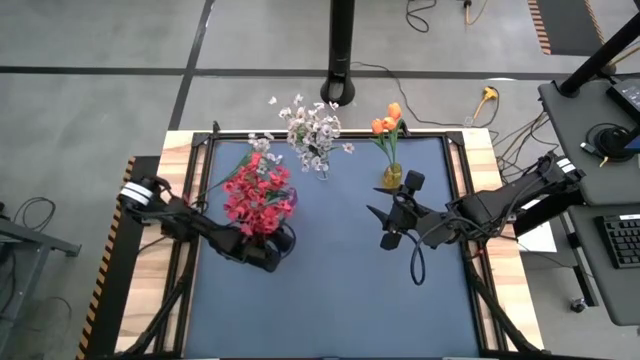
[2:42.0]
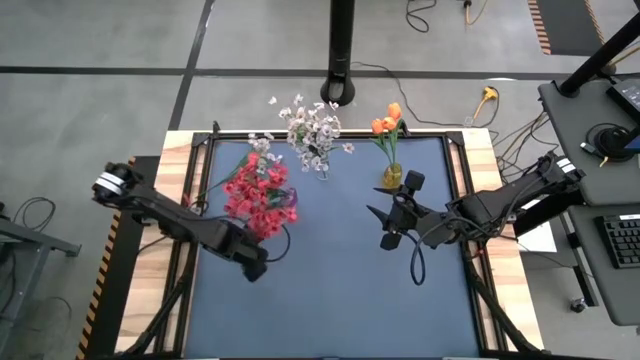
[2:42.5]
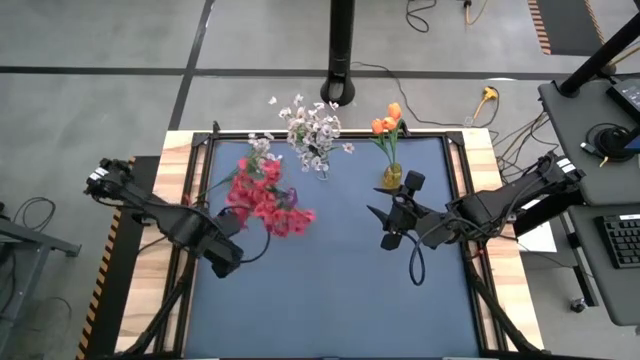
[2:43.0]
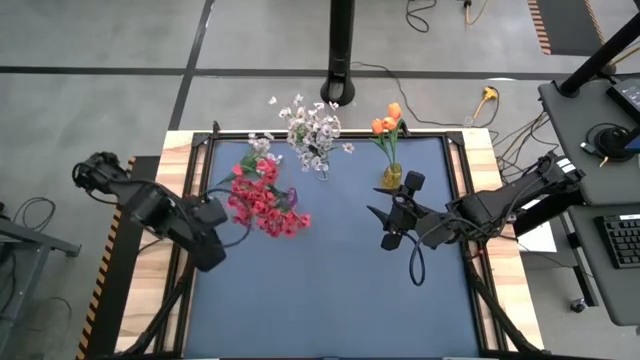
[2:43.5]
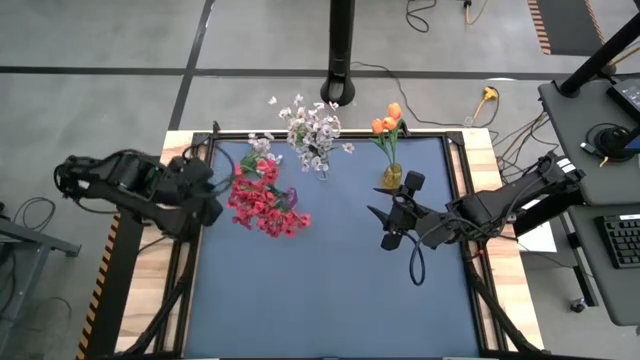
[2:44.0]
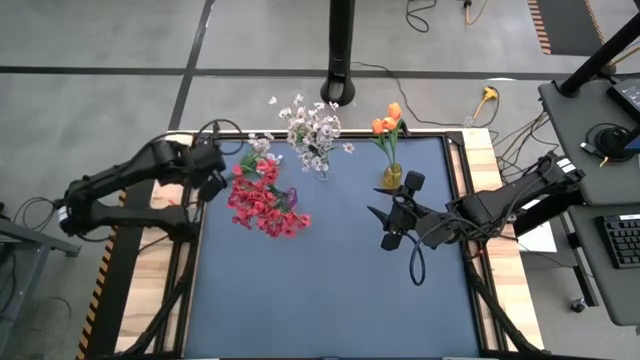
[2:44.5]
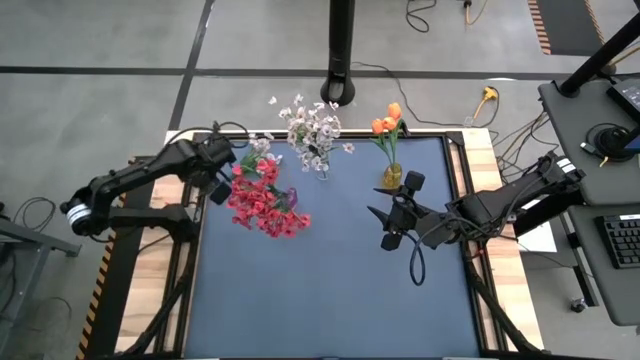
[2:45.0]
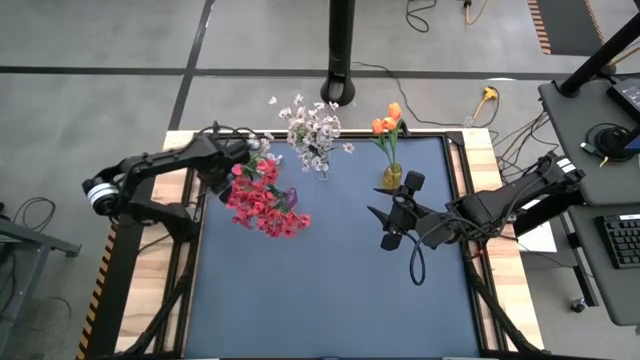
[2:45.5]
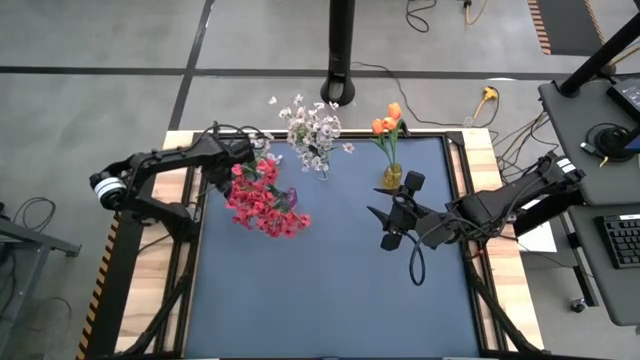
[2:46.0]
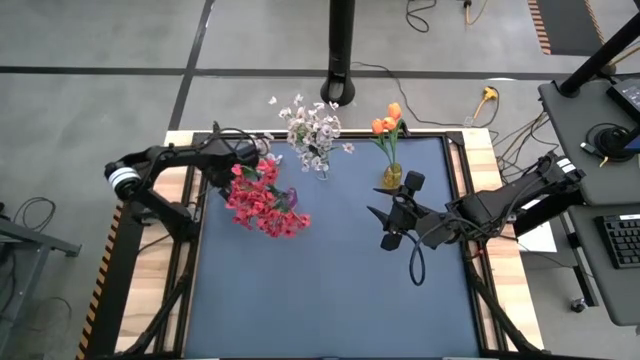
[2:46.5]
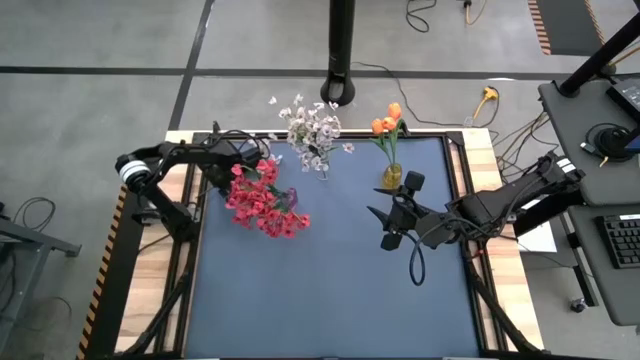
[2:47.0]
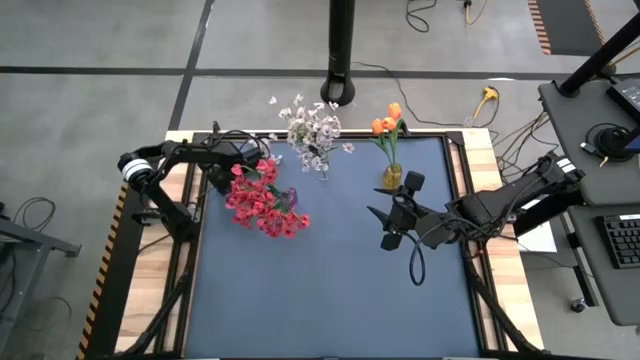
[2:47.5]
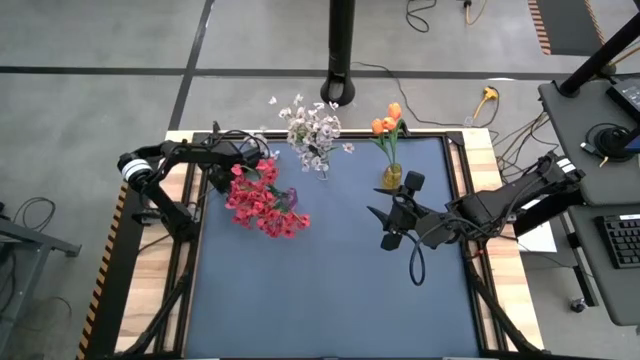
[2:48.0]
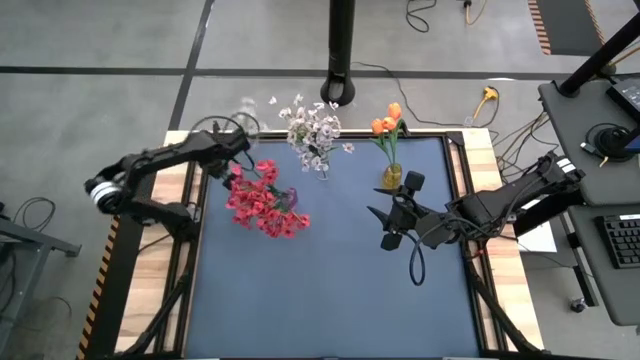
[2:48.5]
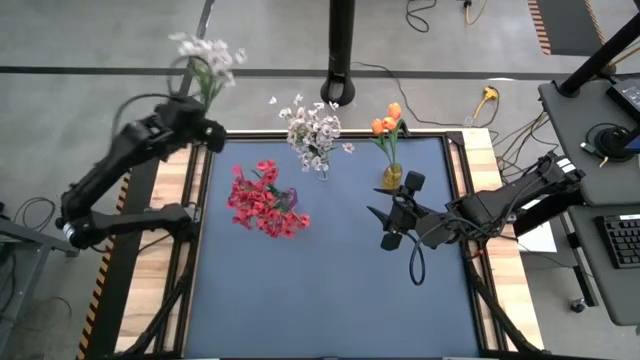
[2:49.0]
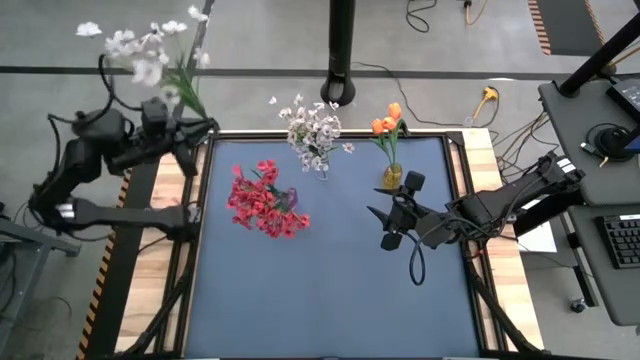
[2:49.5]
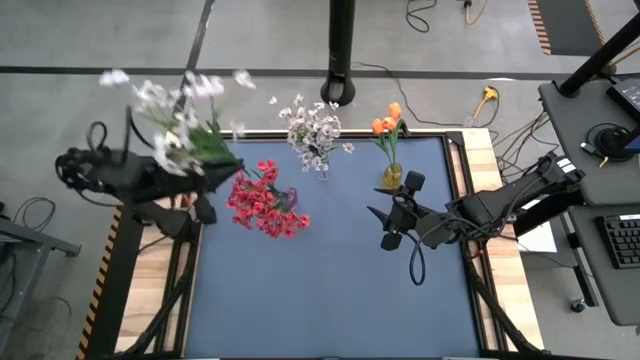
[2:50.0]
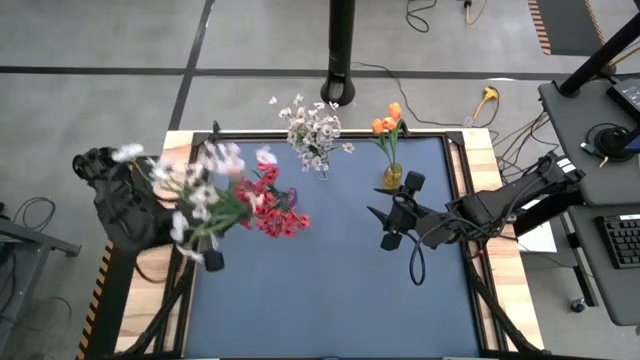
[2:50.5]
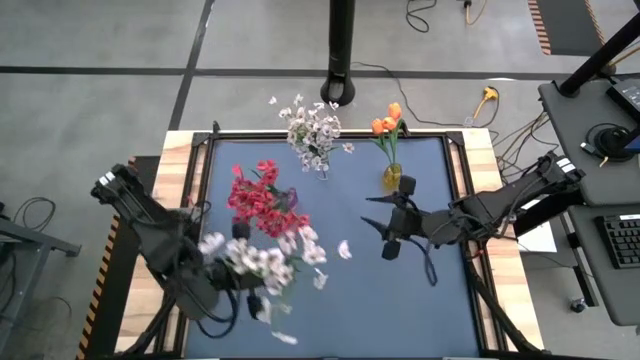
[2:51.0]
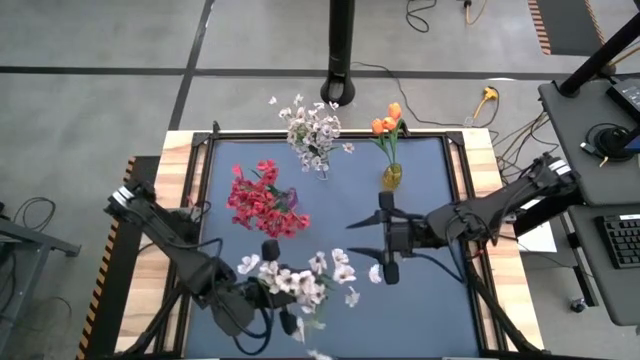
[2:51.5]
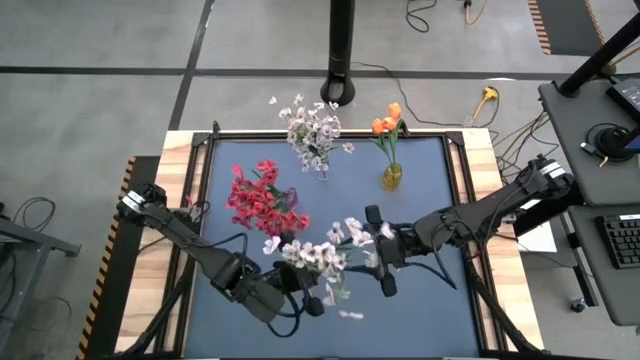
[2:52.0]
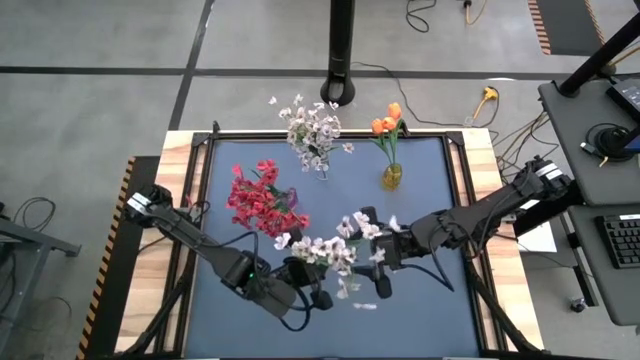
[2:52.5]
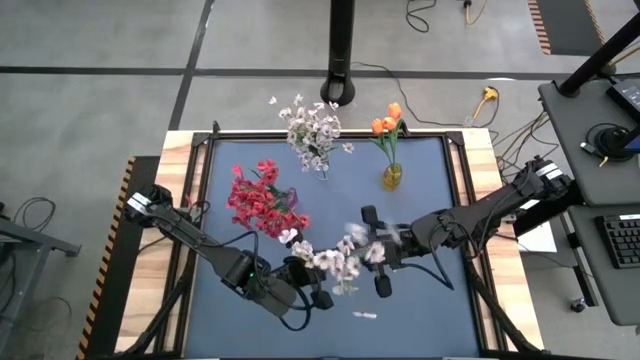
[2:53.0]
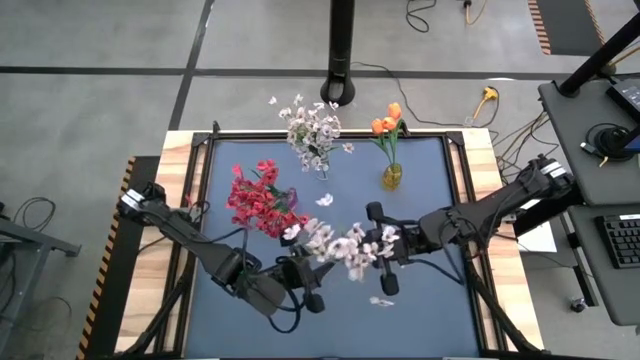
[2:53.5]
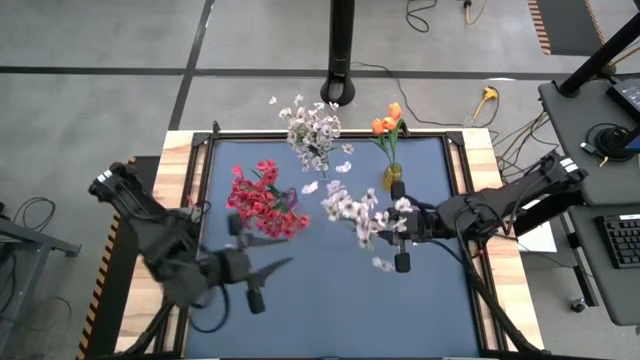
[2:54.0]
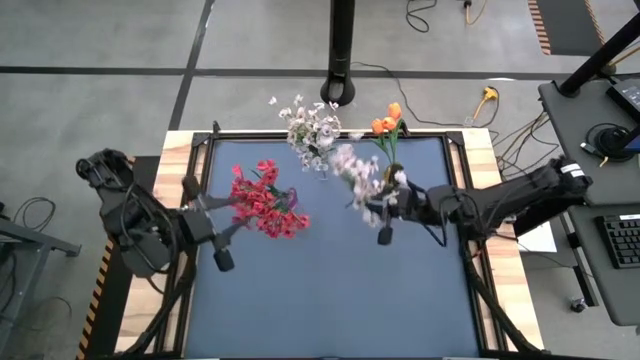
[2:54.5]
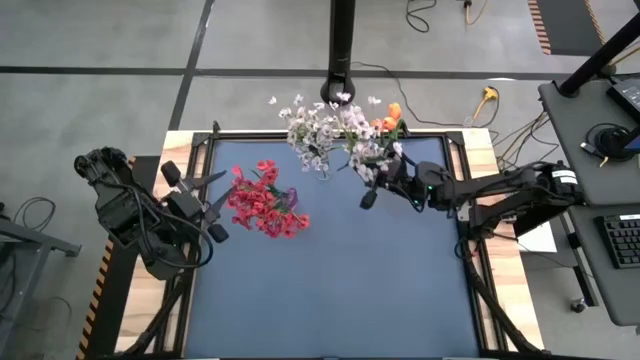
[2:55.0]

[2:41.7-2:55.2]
Task: Sort flowers into vase by color
Put the white flower into the transparent vase

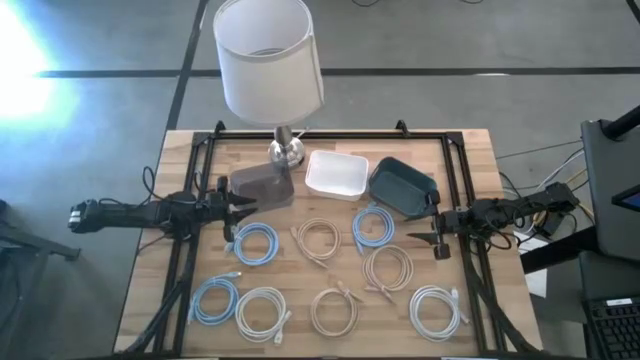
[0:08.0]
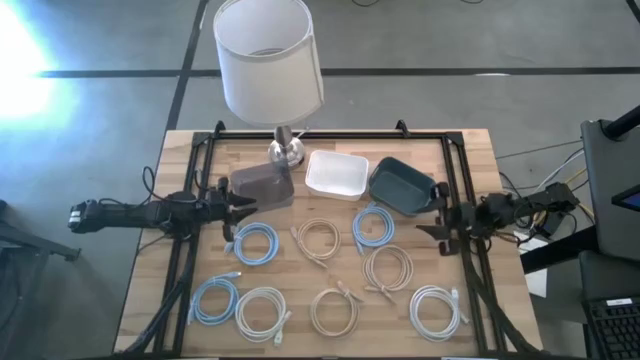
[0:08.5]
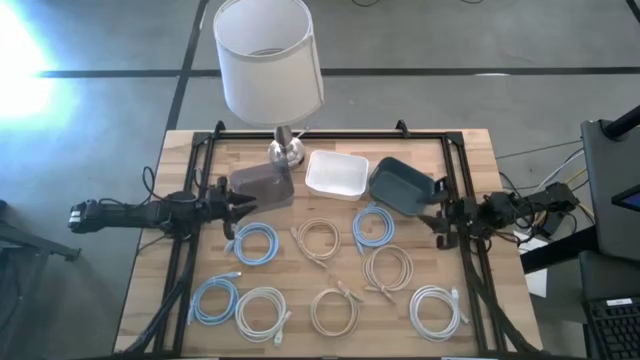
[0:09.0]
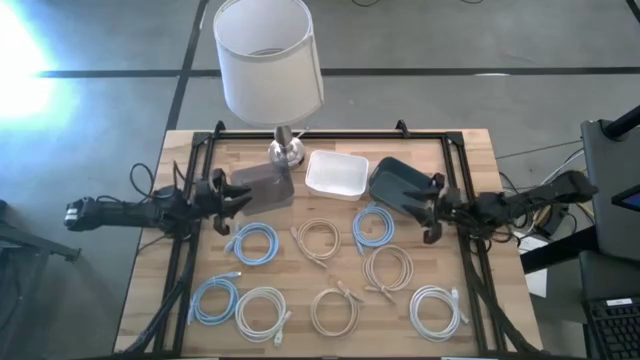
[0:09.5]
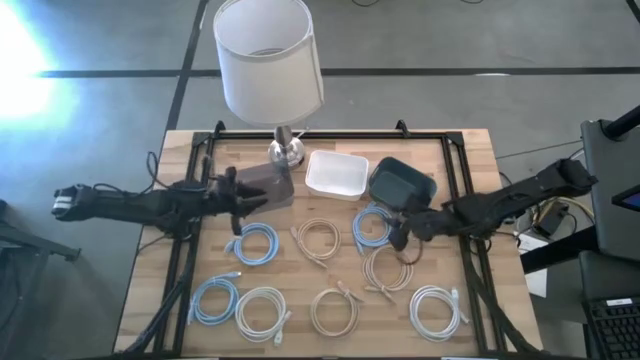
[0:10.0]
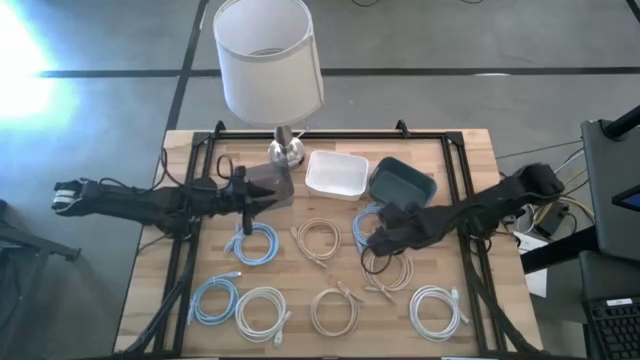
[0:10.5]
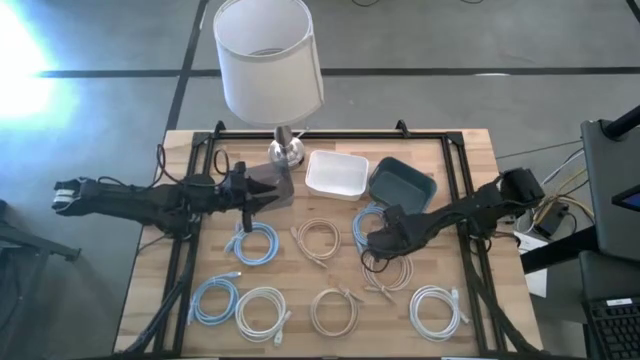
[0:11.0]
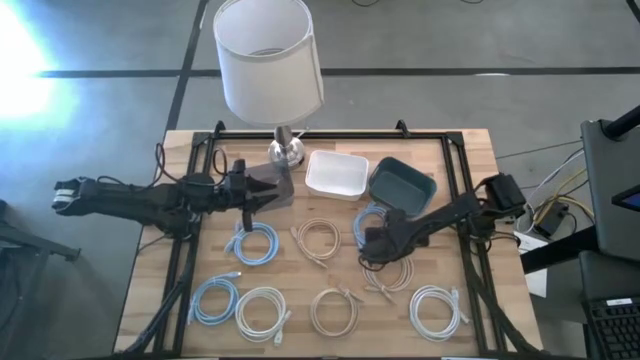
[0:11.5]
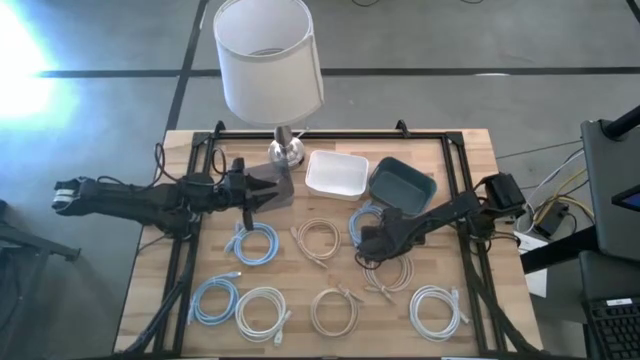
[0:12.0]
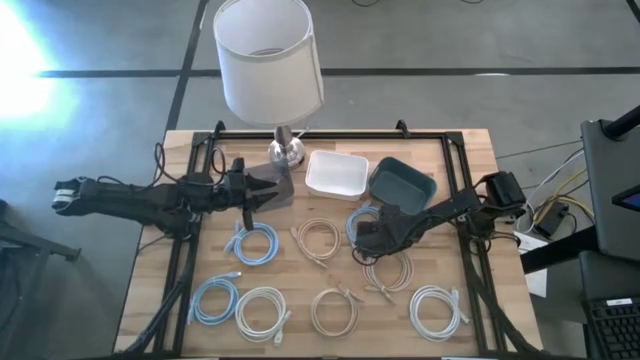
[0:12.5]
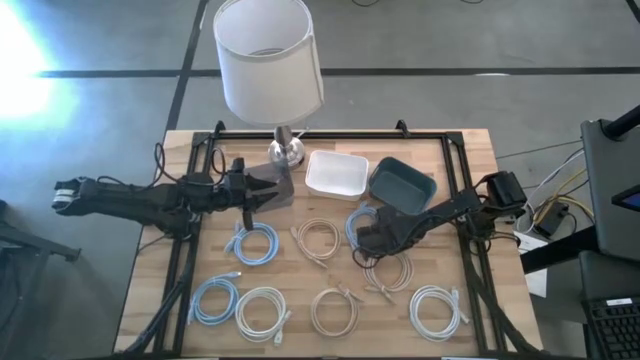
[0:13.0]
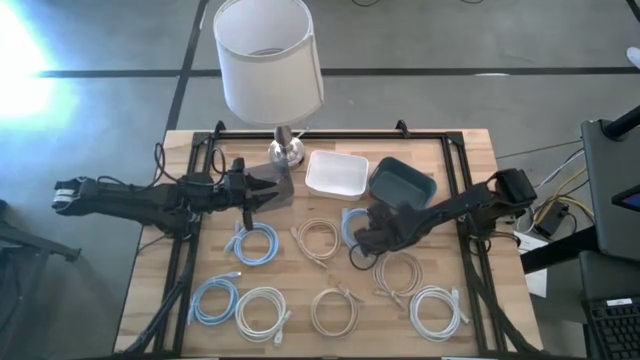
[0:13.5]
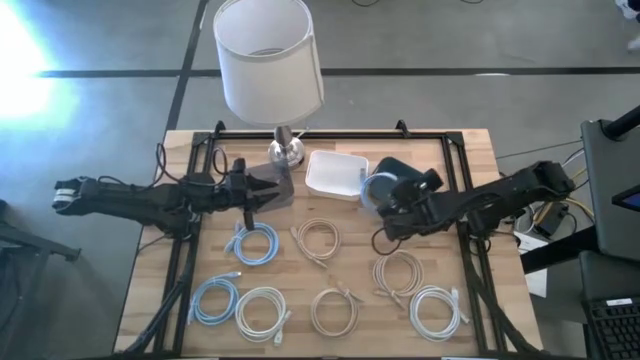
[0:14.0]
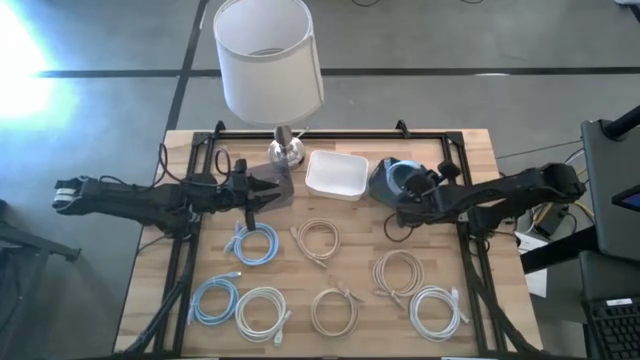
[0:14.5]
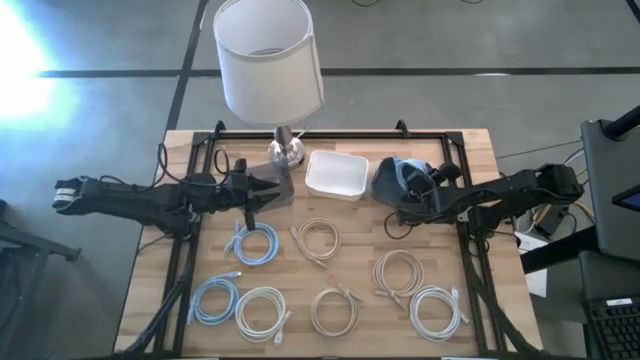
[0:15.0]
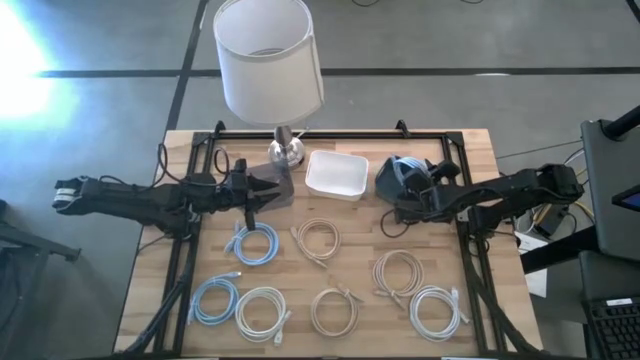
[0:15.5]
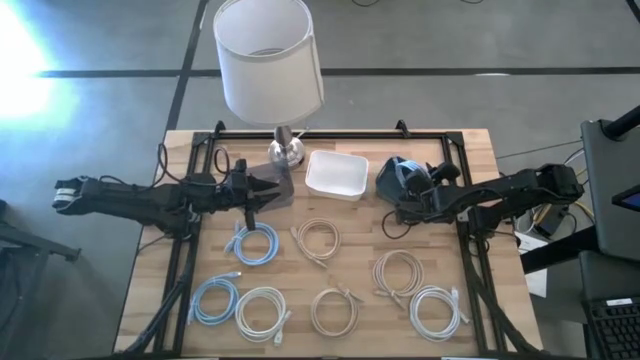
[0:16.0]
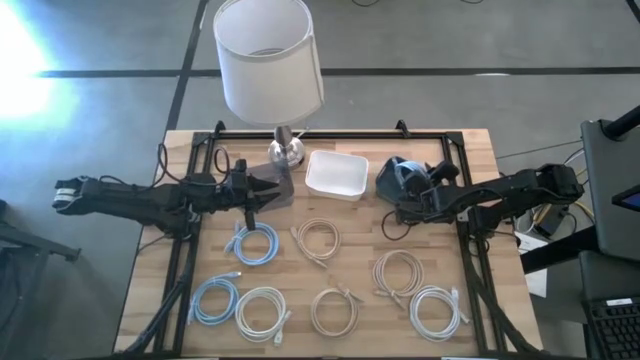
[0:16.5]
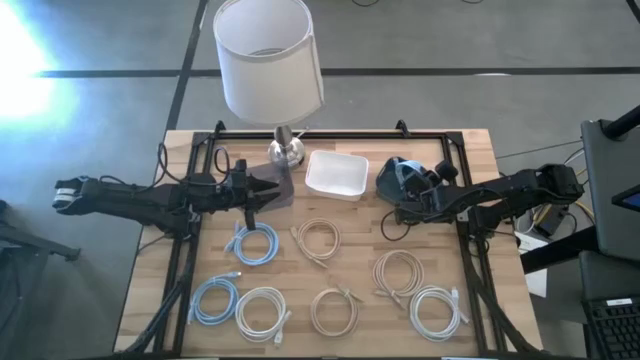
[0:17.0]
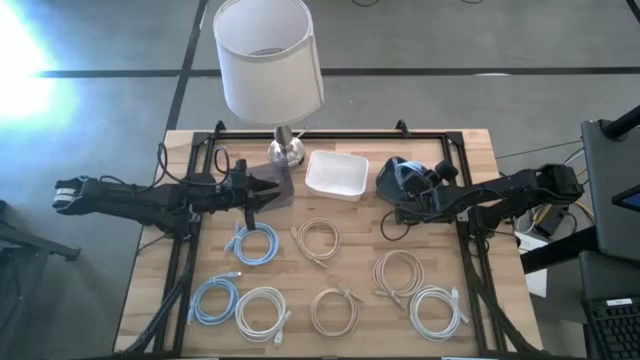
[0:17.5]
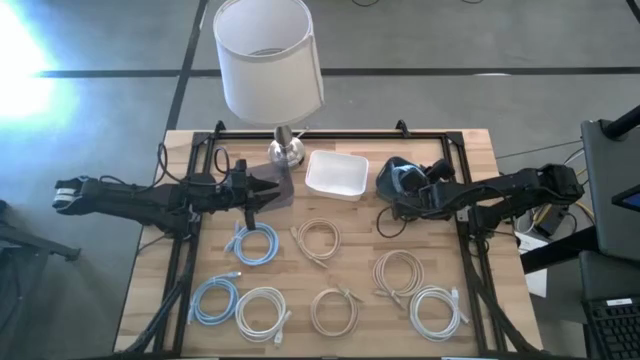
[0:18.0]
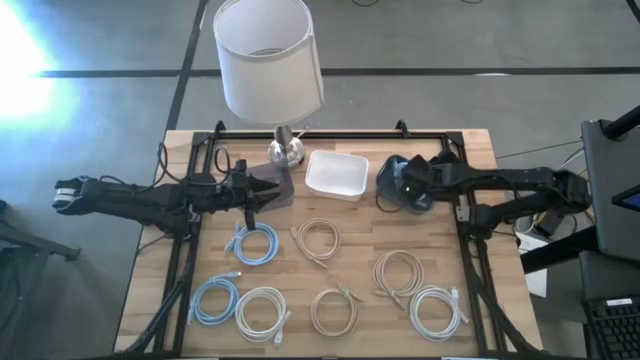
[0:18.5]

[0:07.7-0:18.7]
Task: Sort HDMI cables
Put the right blue hdmi cable into the blue bin
